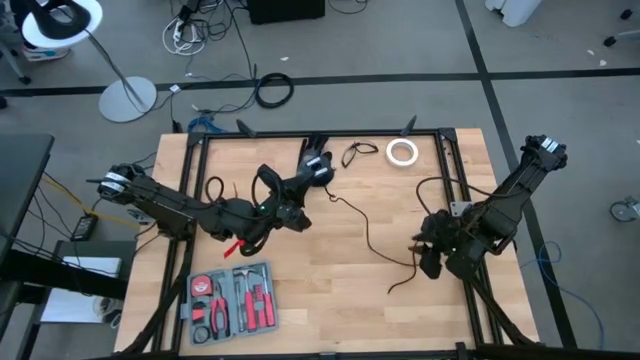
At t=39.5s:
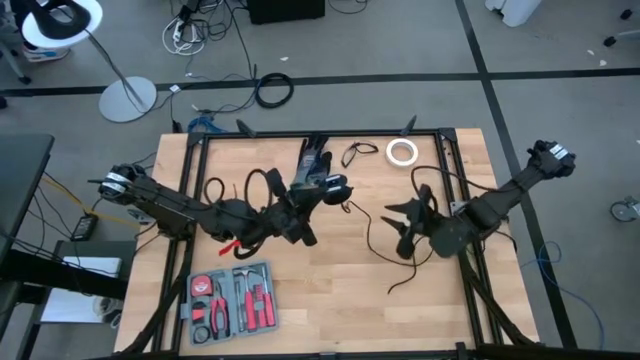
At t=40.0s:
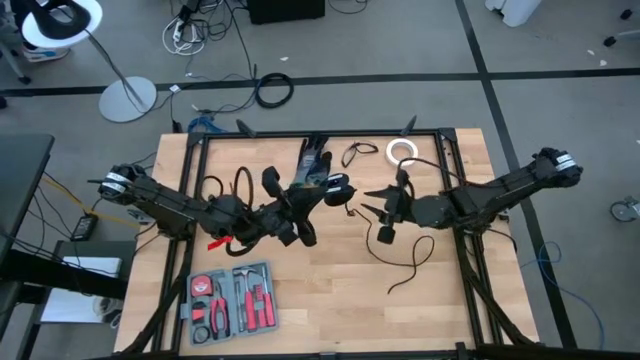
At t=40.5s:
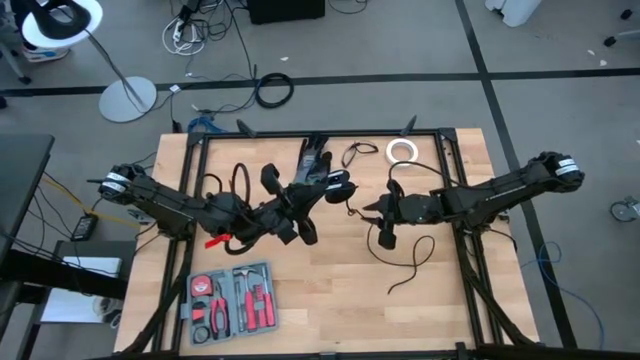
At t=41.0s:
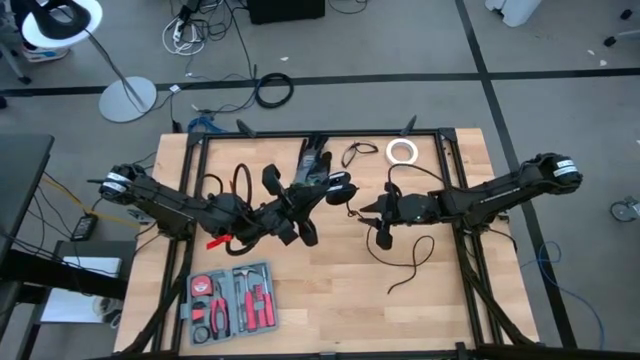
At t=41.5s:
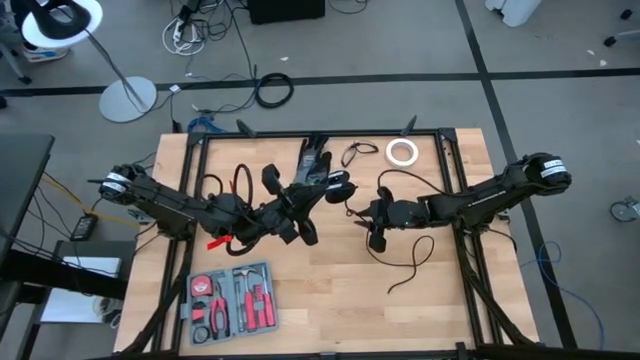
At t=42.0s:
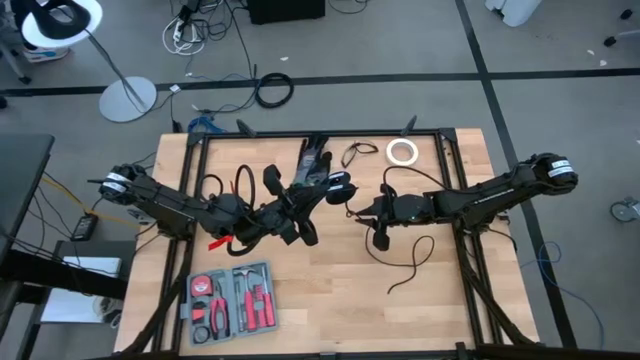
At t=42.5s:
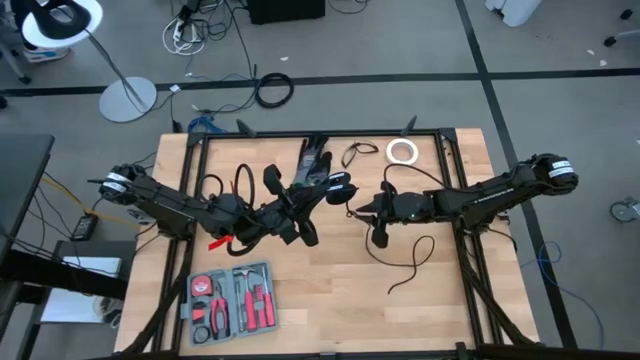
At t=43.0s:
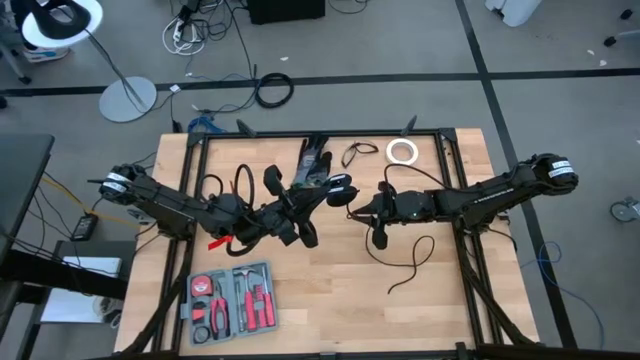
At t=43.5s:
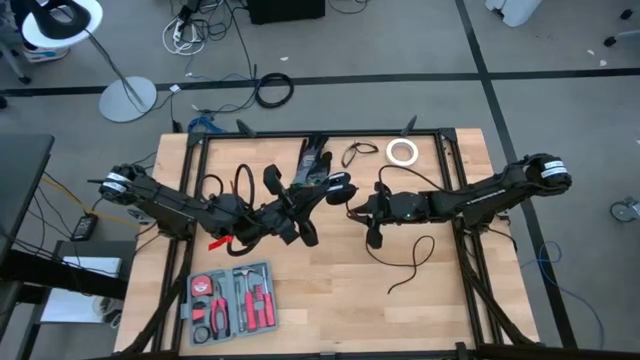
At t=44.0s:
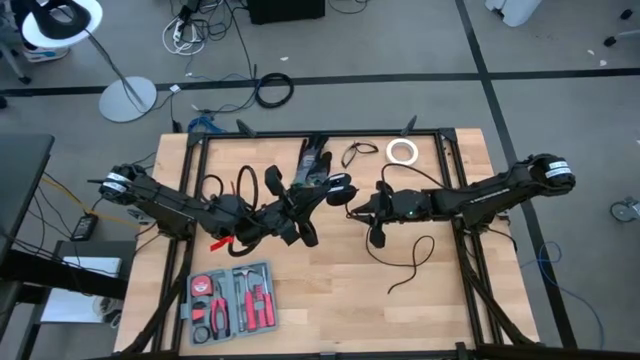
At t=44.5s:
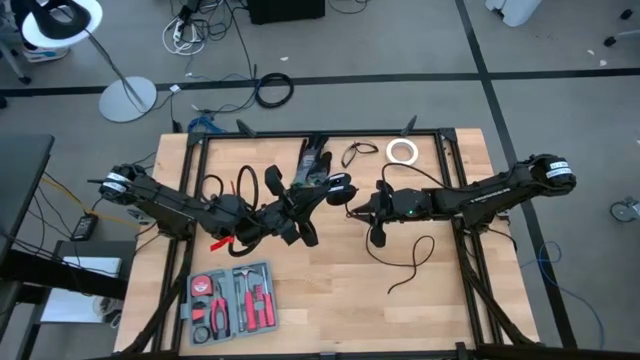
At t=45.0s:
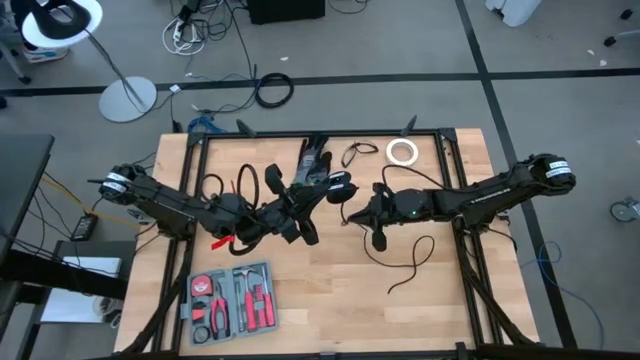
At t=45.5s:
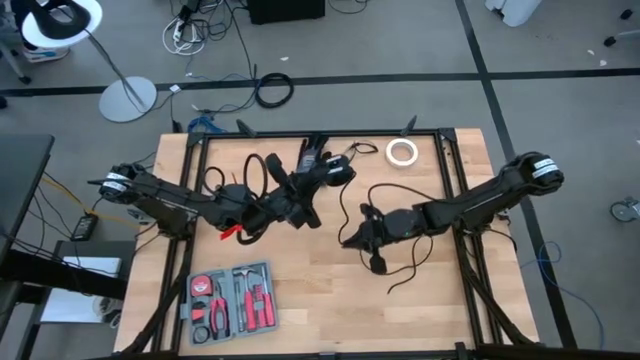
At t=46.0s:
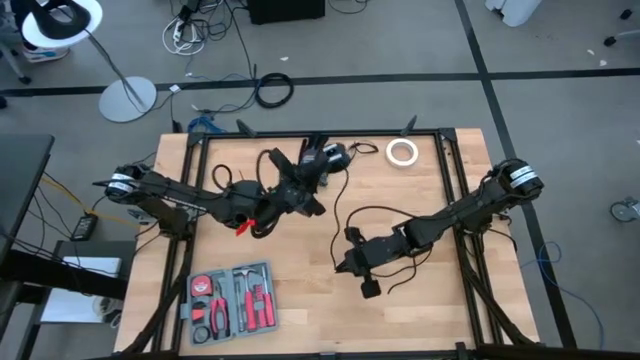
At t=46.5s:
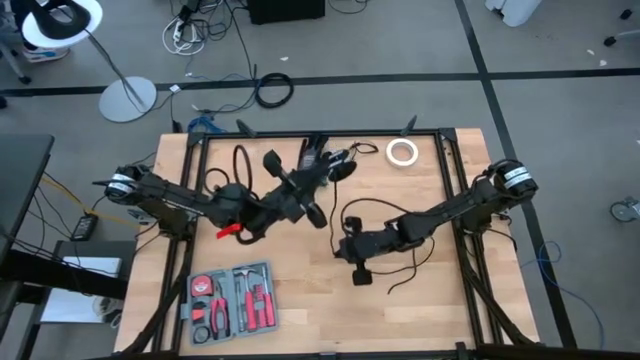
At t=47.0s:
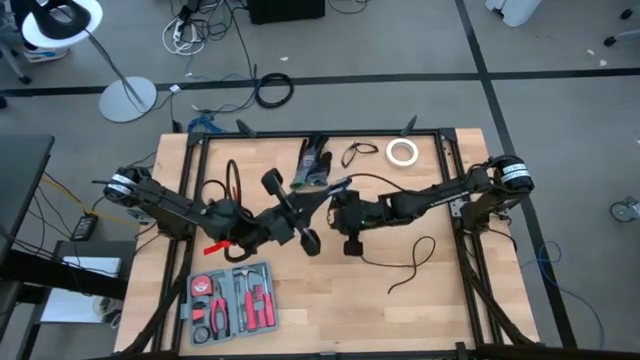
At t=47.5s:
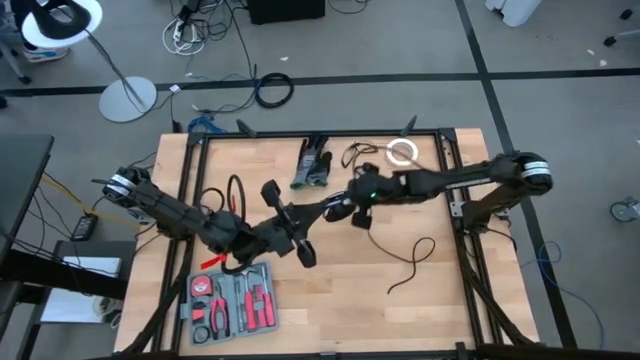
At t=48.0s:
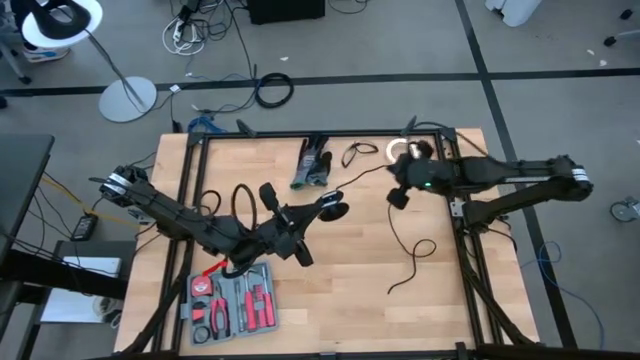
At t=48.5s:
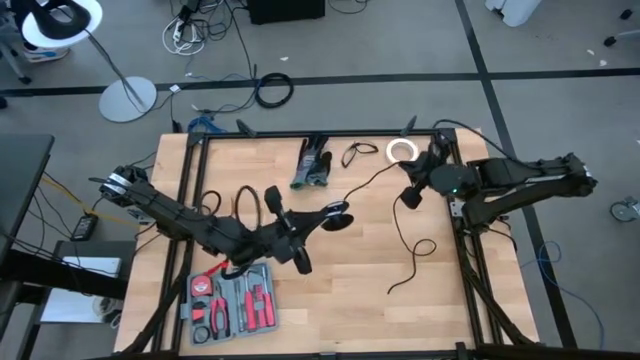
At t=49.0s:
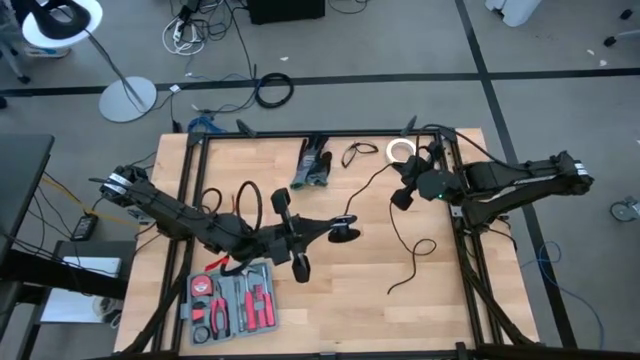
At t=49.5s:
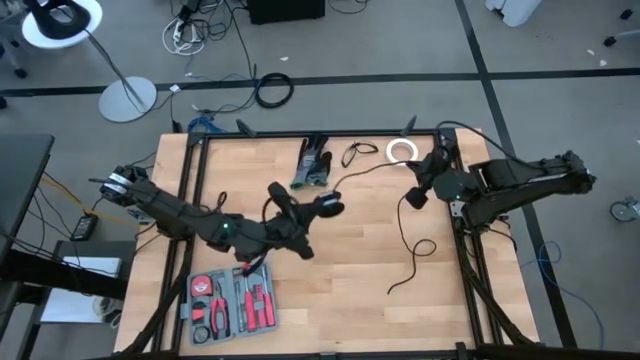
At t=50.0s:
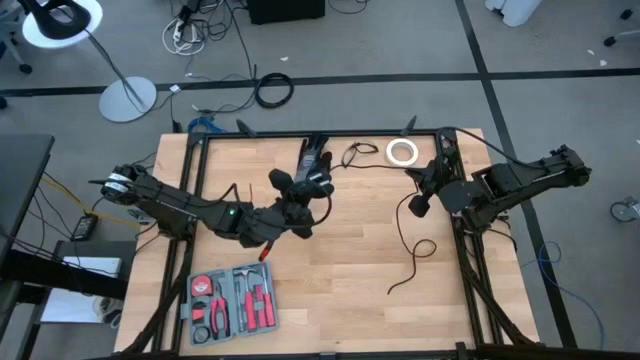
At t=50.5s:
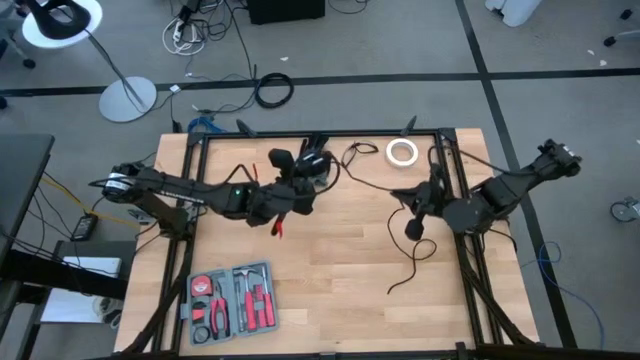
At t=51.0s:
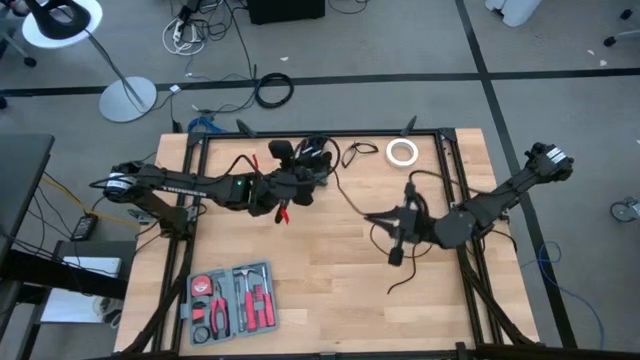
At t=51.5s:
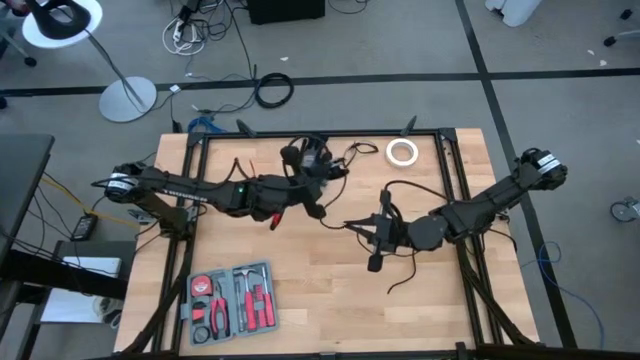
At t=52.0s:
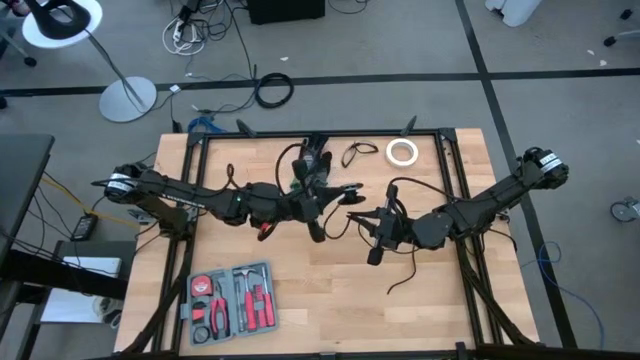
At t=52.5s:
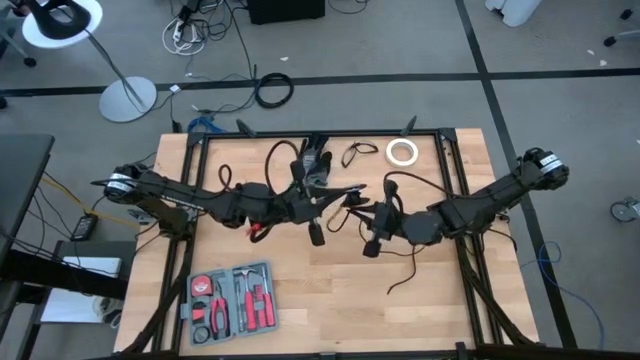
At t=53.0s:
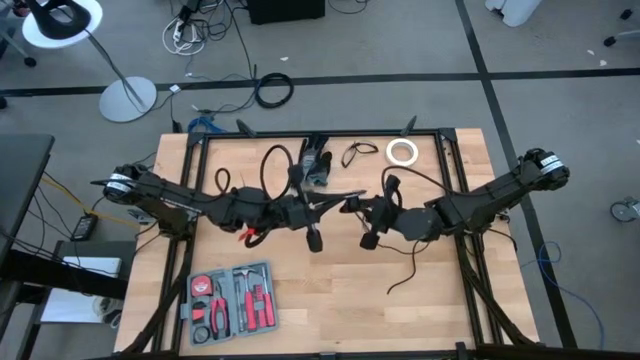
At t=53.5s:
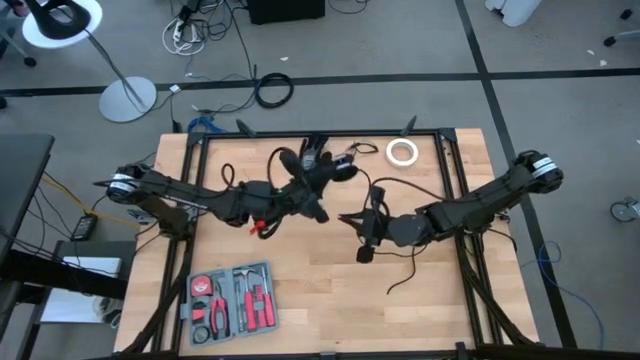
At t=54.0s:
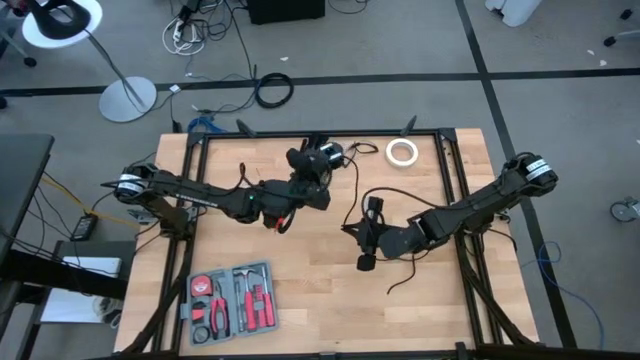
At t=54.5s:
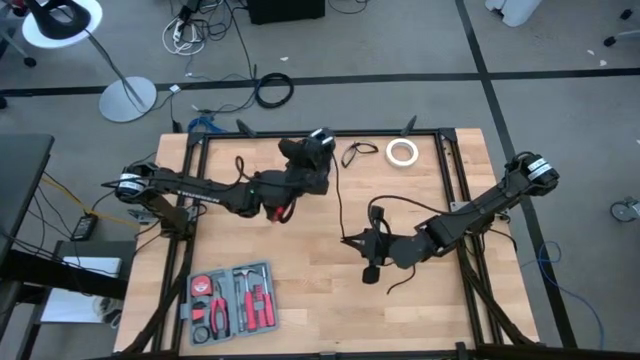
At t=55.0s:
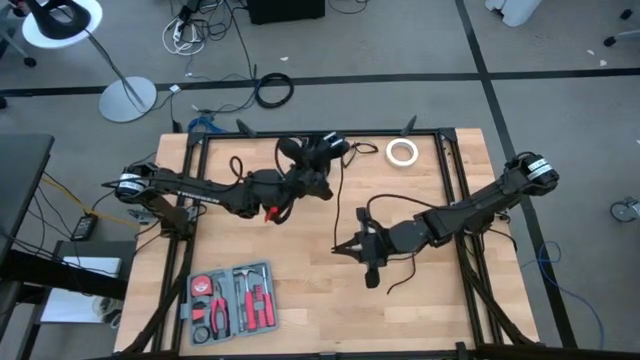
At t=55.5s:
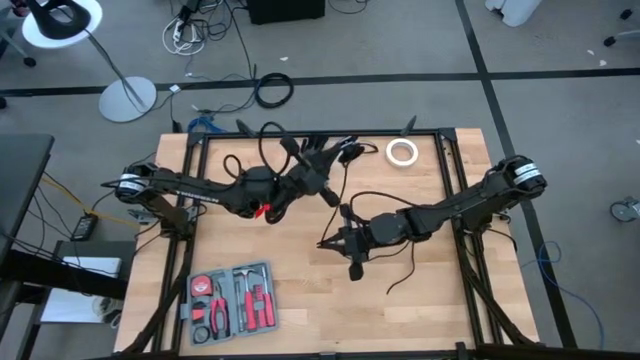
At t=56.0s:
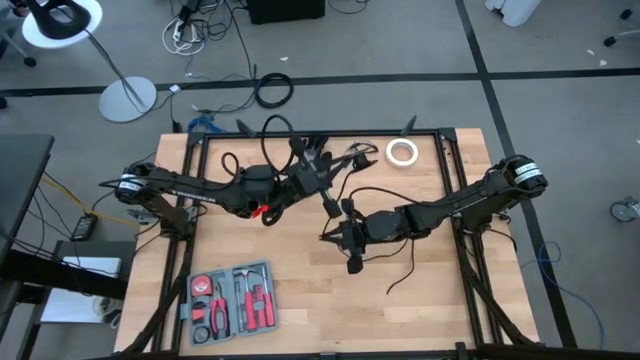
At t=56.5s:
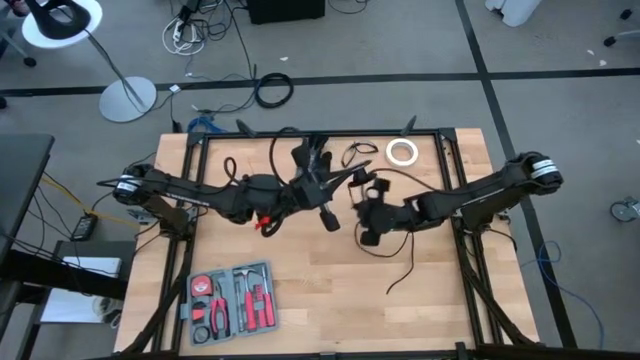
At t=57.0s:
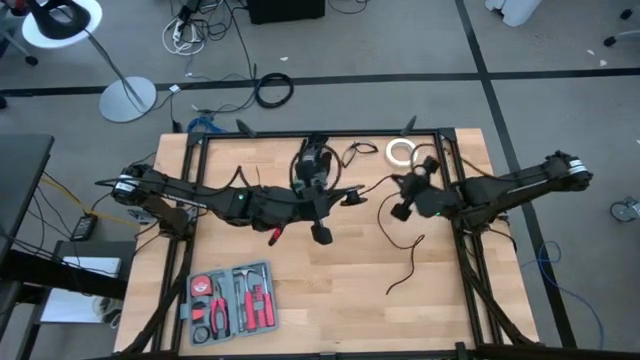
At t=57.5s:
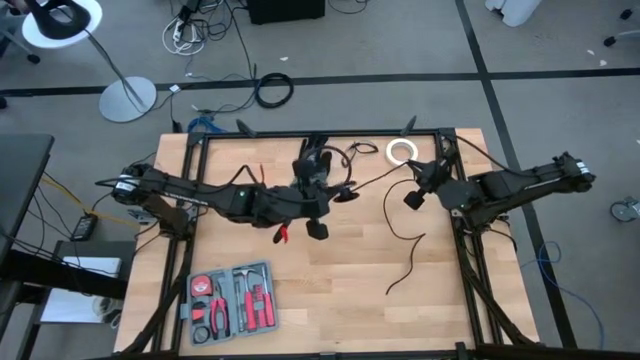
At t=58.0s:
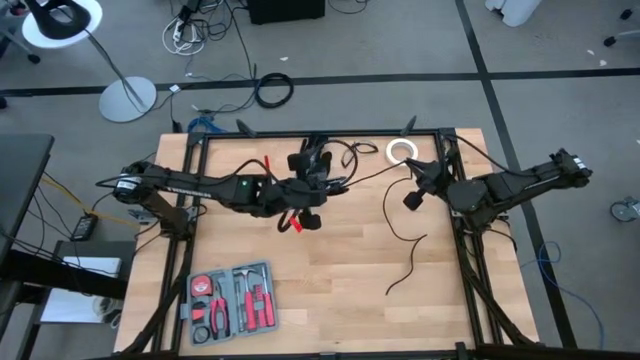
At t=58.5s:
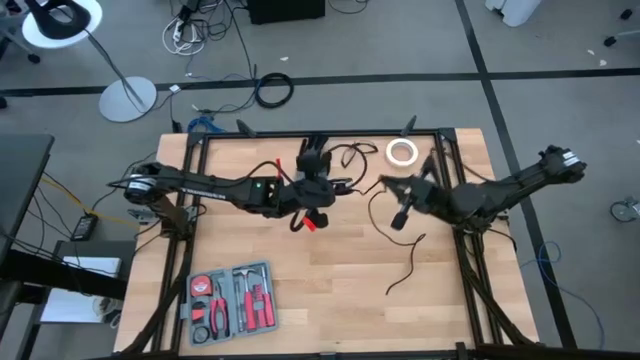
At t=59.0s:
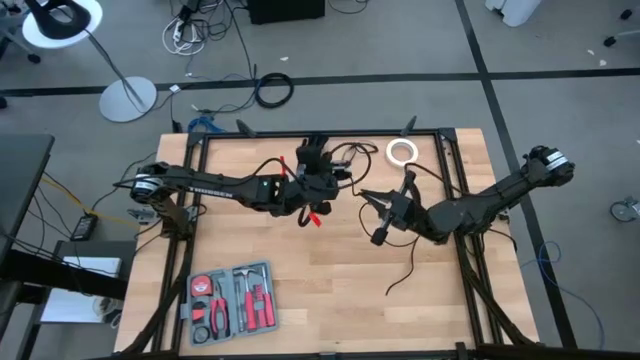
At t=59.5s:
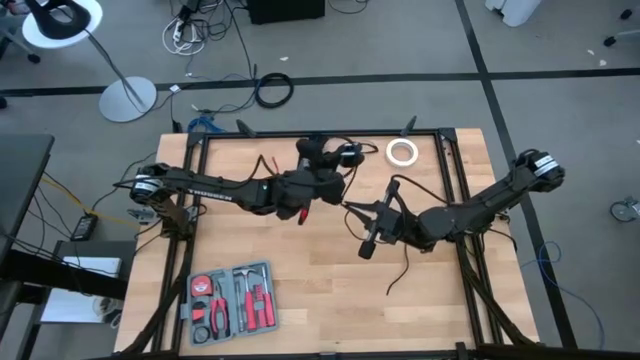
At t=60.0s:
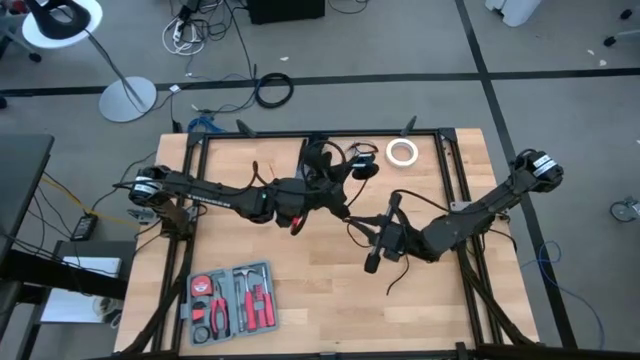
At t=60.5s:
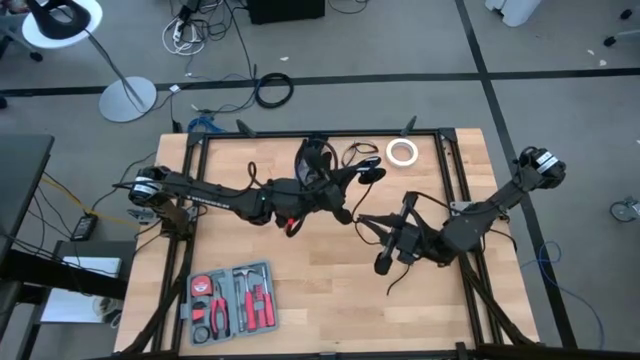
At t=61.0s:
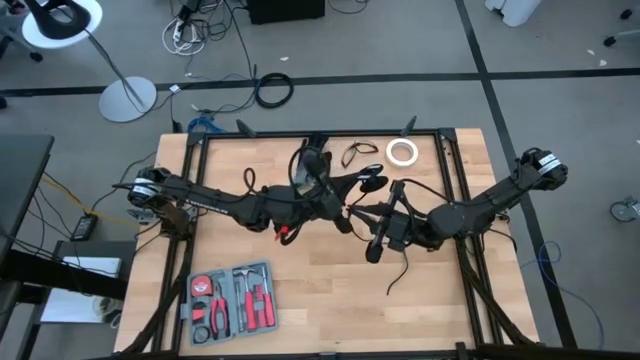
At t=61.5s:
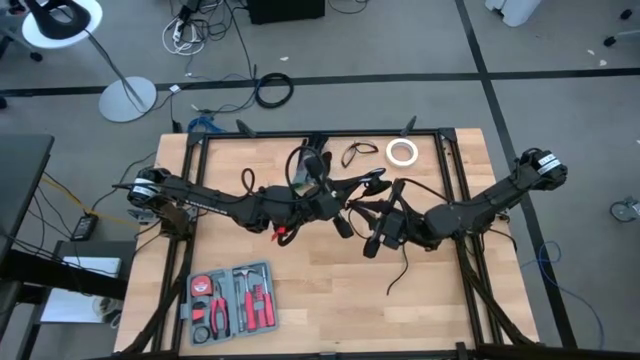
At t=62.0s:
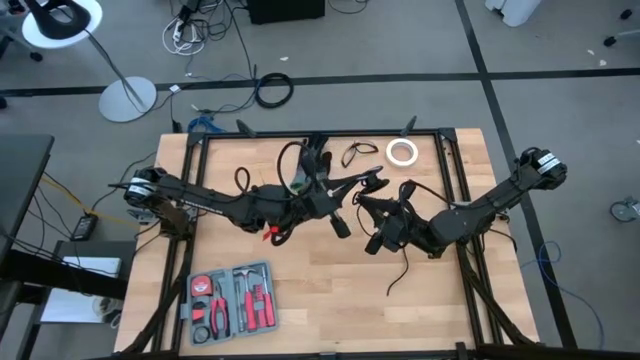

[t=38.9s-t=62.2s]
Task: Coil cords
Coil the black wire into a spool
